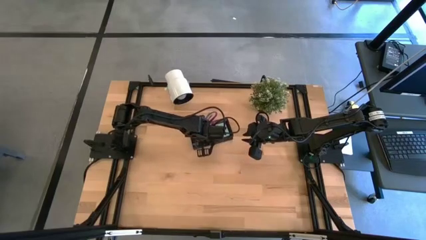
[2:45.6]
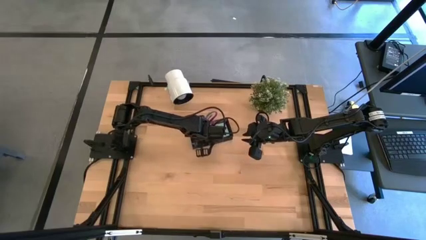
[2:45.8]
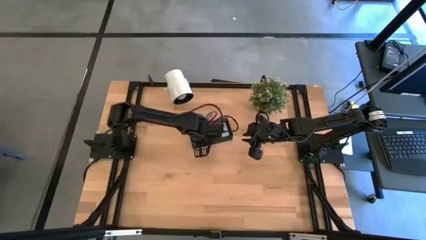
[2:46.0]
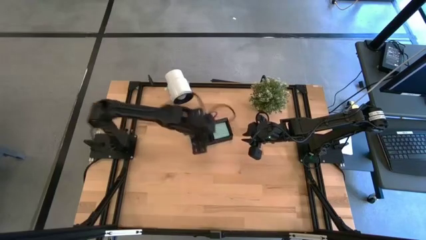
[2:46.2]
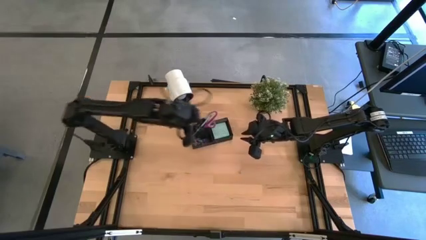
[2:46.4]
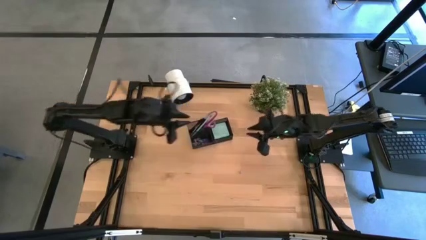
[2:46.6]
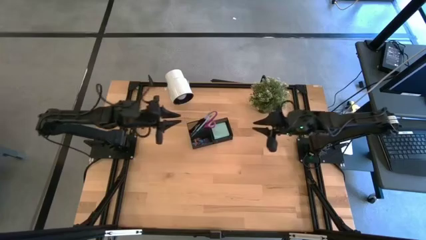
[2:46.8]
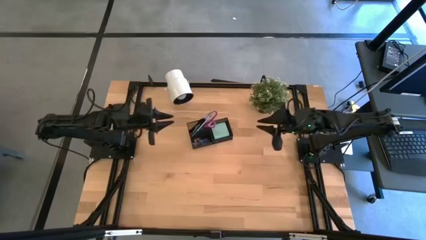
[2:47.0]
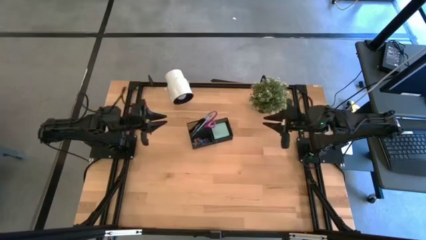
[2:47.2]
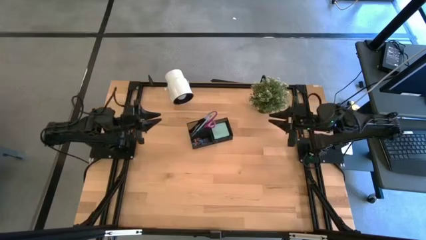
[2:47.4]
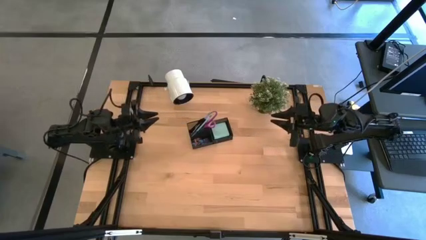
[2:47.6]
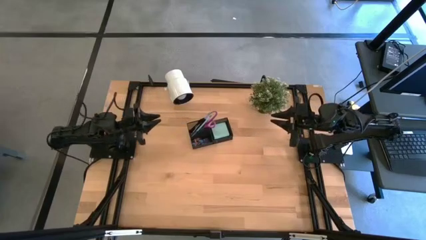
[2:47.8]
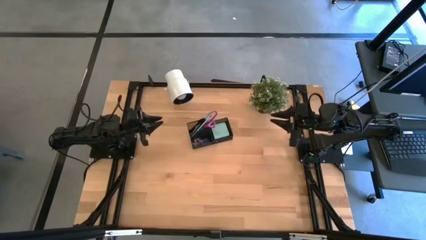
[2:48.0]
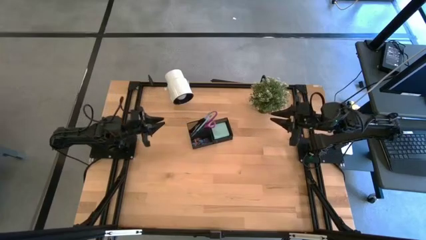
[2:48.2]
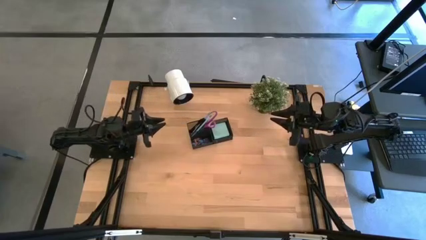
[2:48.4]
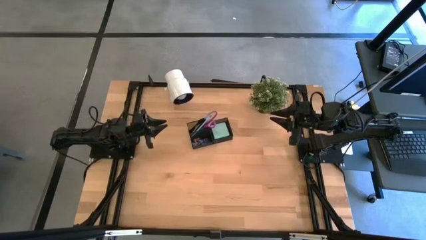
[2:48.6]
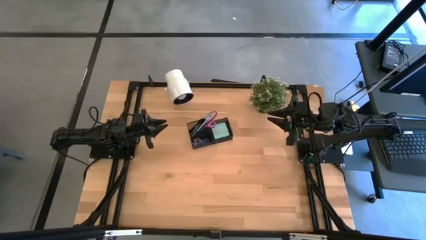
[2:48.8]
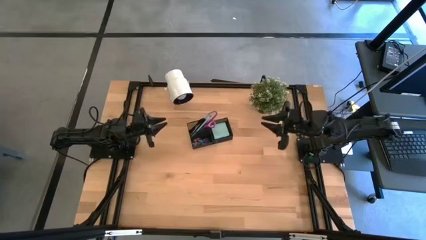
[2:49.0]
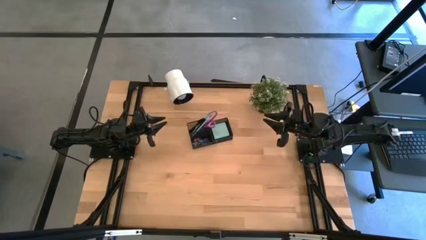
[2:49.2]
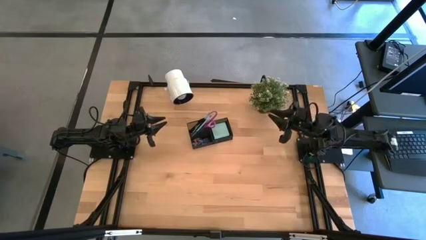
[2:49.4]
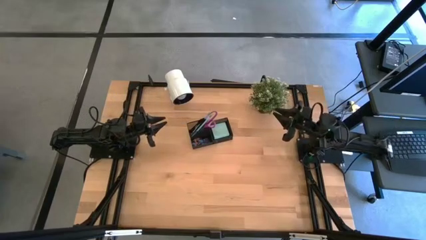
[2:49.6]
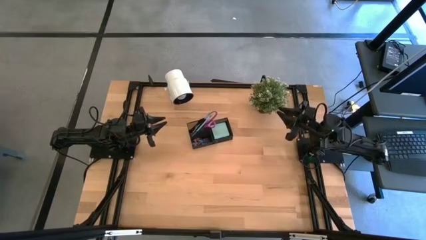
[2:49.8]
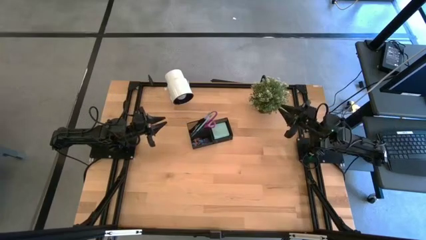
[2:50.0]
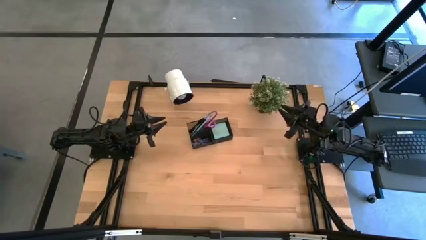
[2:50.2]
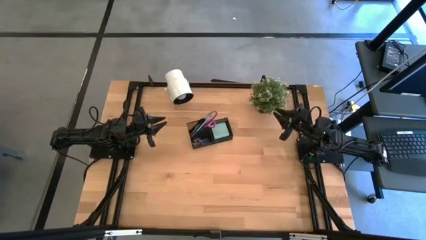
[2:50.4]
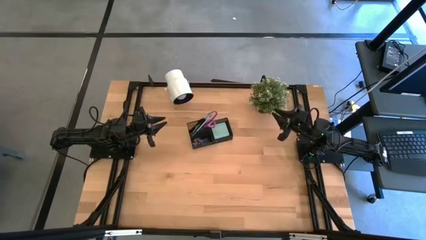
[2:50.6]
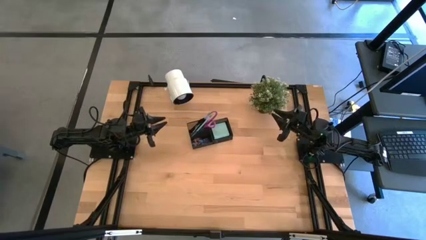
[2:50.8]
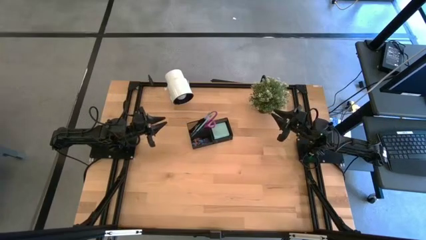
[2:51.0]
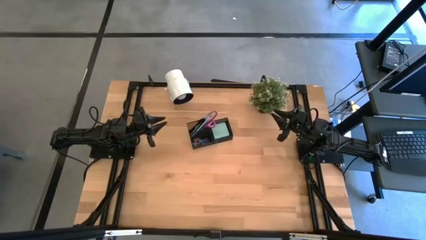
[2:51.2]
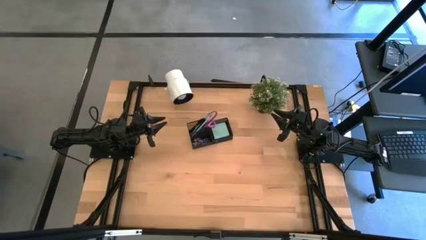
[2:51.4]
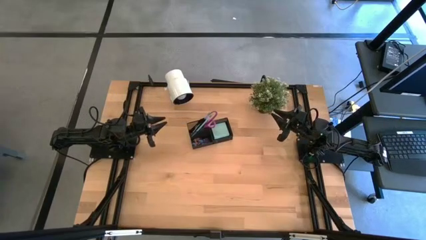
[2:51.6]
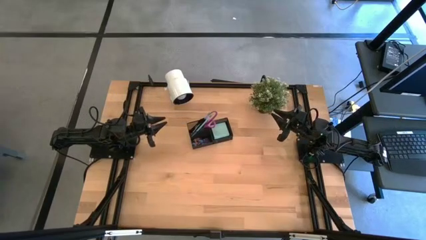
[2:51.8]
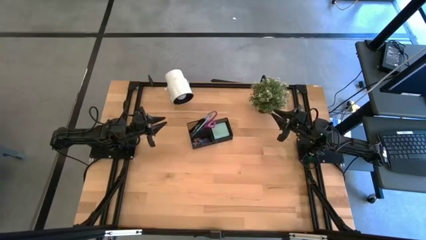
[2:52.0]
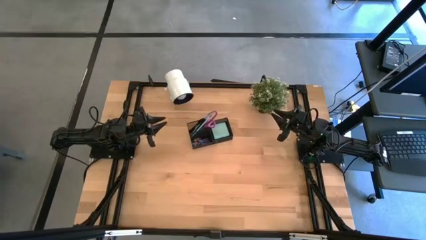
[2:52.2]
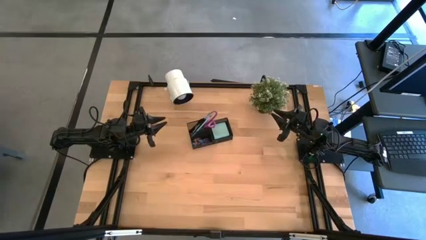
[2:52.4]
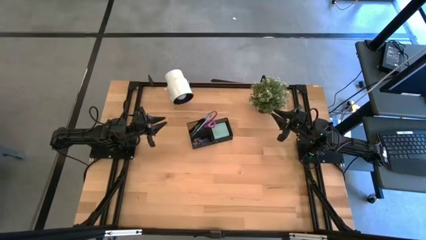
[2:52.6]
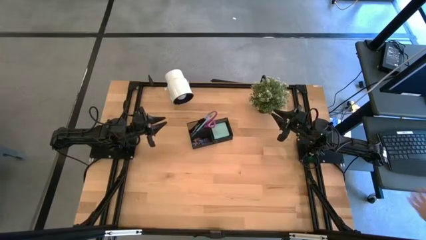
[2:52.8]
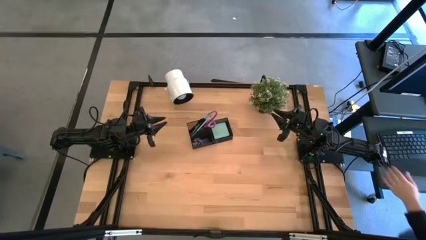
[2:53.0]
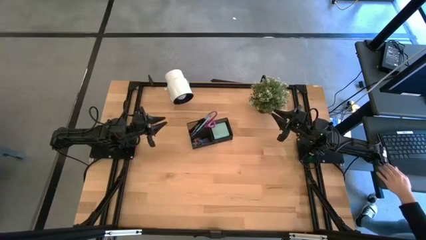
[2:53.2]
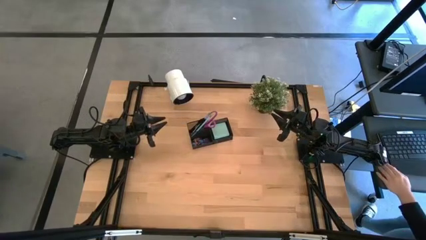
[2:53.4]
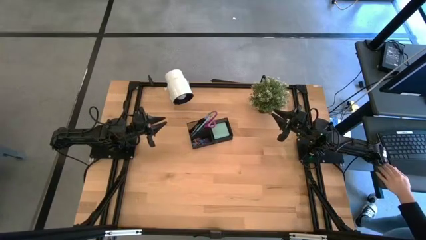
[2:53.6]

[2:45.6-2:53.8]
Task: Pick and place office supplies into organizer
Return to Home Position

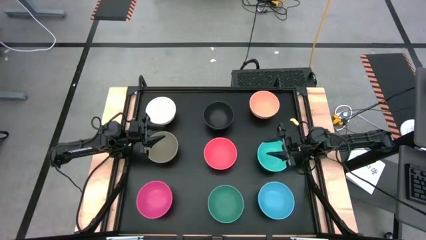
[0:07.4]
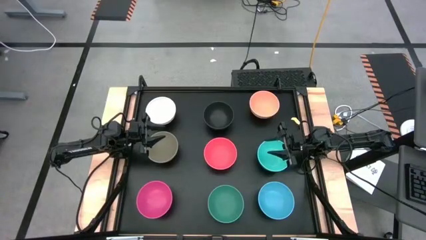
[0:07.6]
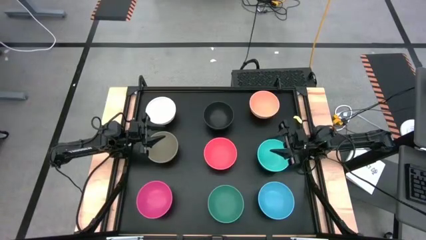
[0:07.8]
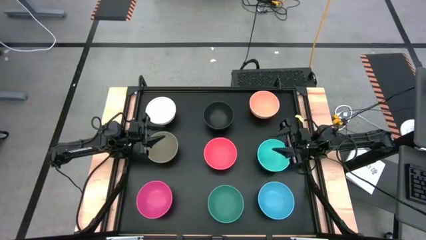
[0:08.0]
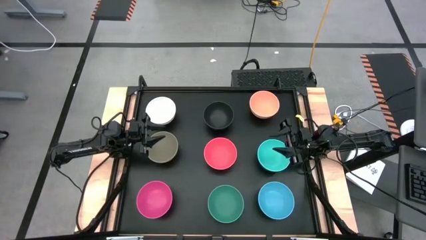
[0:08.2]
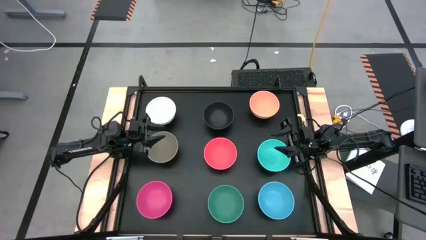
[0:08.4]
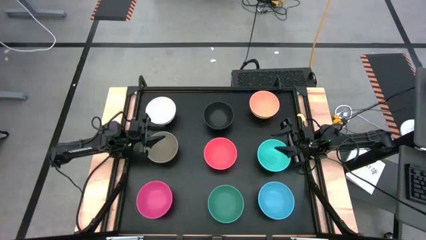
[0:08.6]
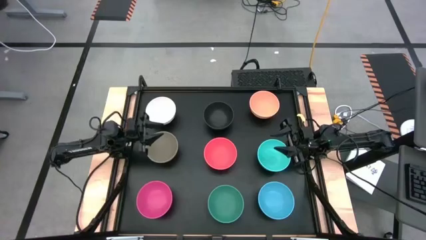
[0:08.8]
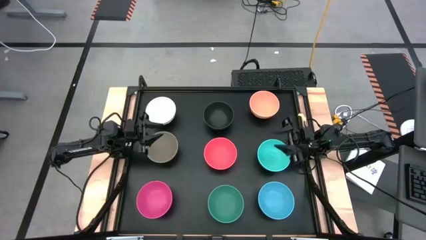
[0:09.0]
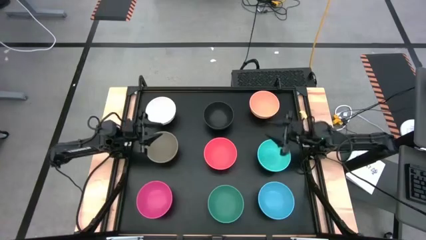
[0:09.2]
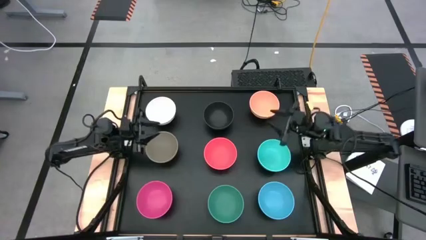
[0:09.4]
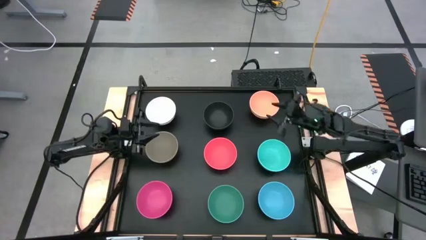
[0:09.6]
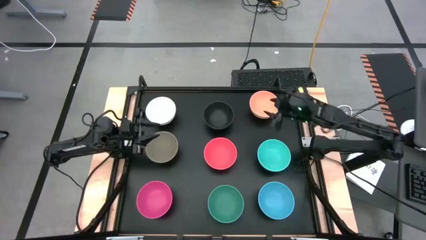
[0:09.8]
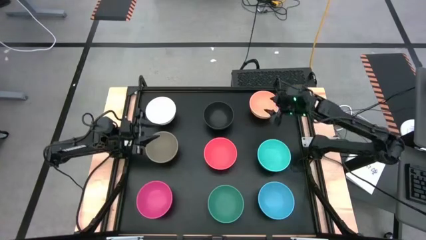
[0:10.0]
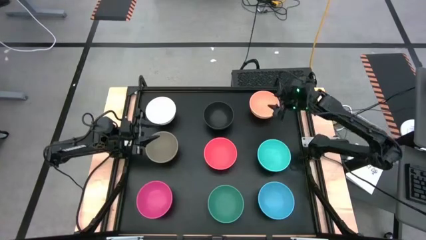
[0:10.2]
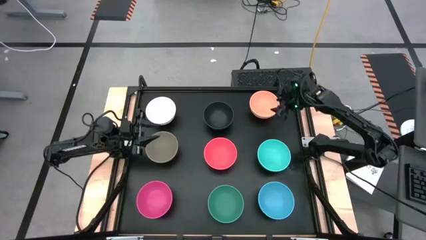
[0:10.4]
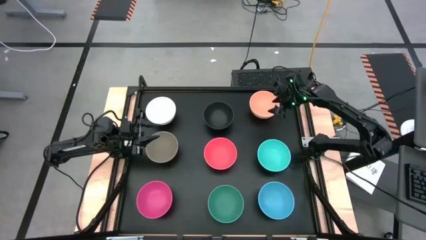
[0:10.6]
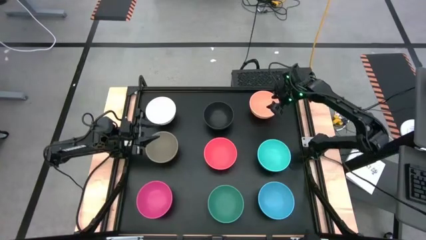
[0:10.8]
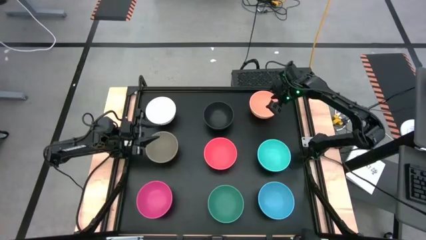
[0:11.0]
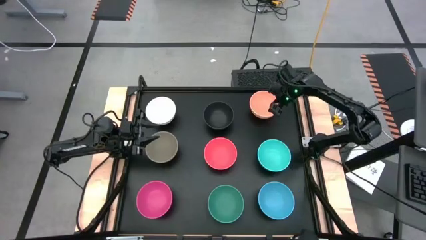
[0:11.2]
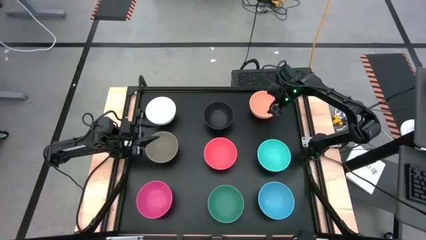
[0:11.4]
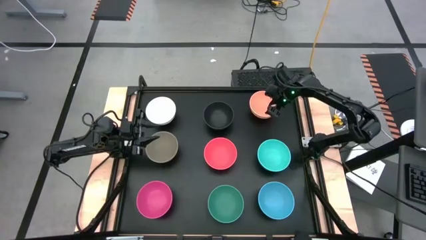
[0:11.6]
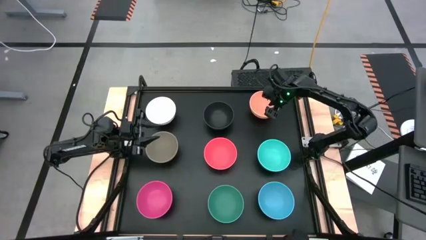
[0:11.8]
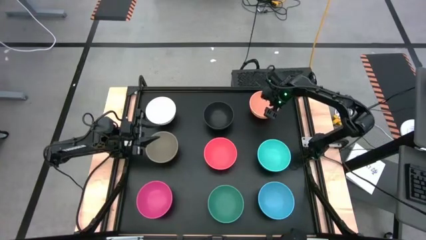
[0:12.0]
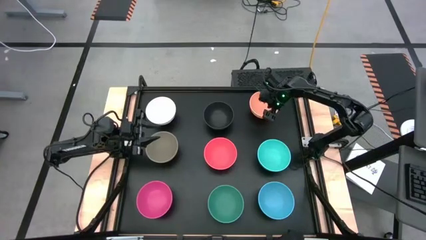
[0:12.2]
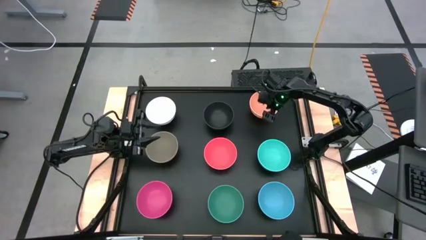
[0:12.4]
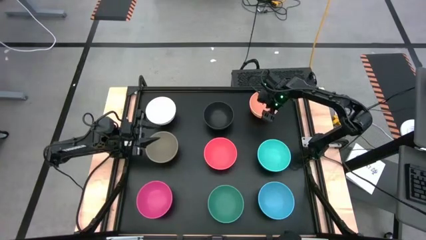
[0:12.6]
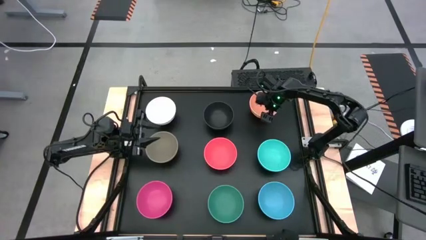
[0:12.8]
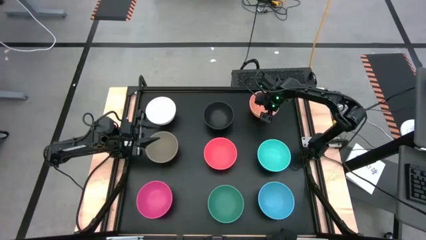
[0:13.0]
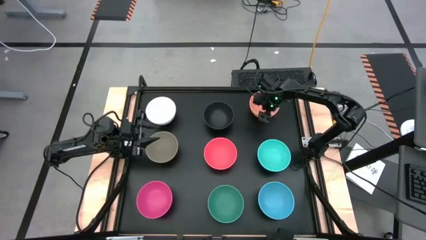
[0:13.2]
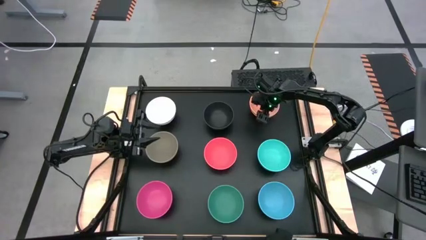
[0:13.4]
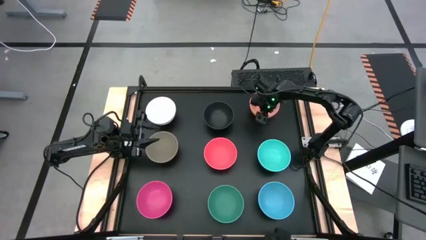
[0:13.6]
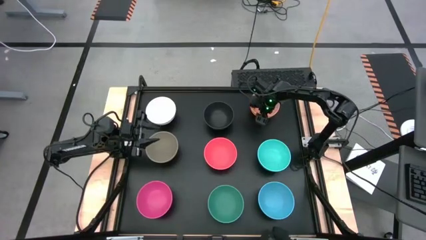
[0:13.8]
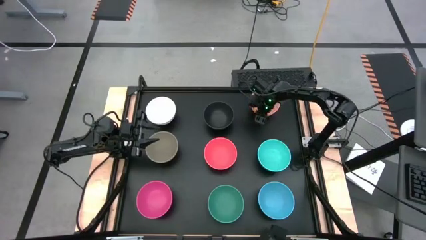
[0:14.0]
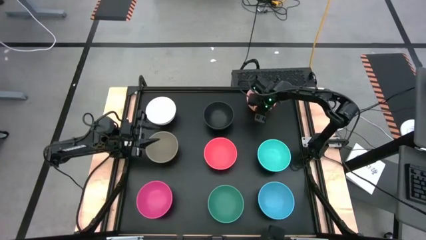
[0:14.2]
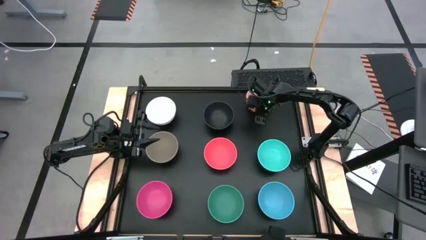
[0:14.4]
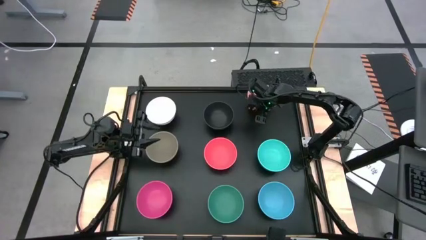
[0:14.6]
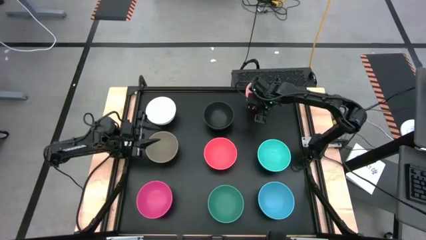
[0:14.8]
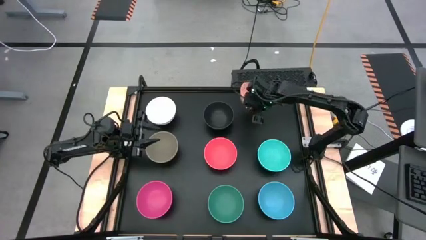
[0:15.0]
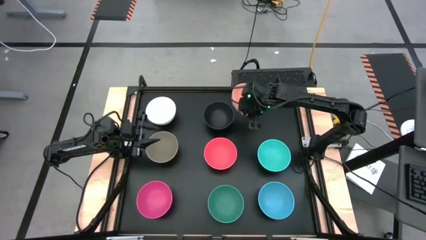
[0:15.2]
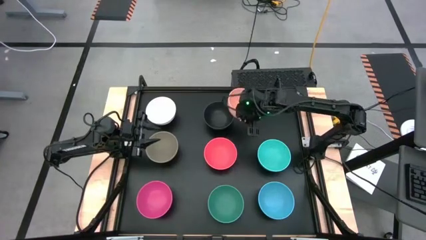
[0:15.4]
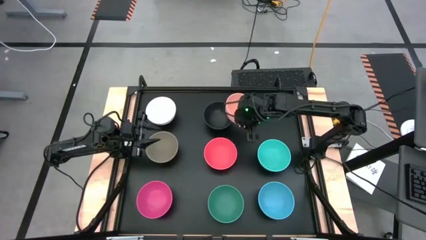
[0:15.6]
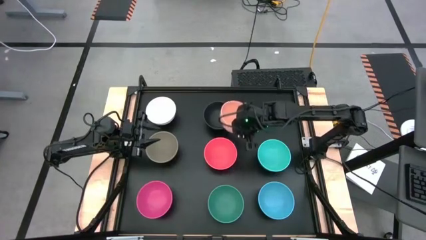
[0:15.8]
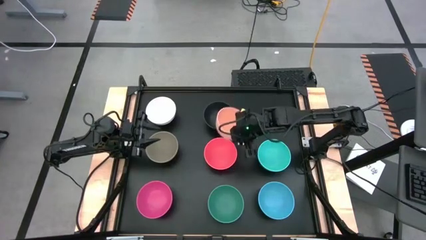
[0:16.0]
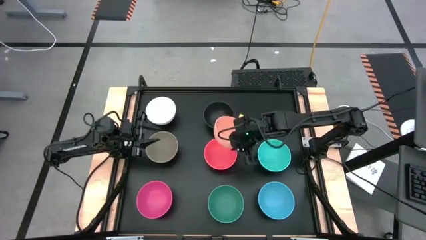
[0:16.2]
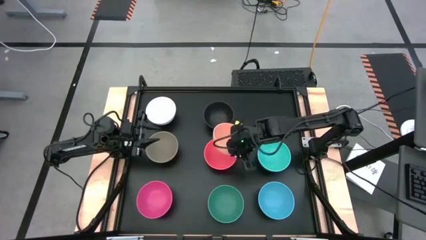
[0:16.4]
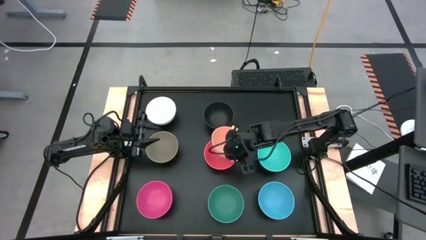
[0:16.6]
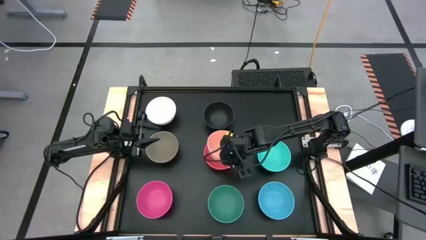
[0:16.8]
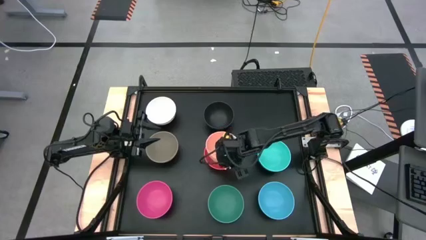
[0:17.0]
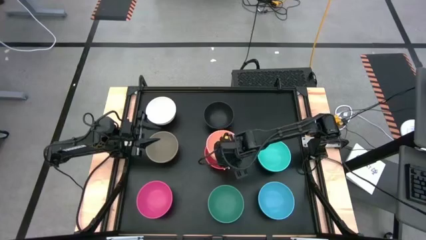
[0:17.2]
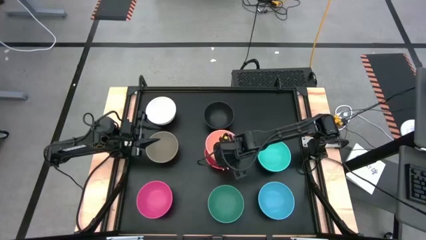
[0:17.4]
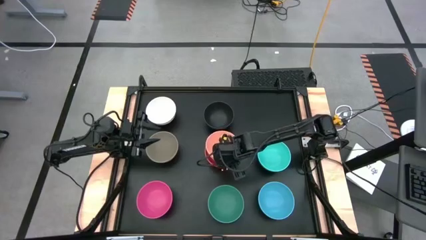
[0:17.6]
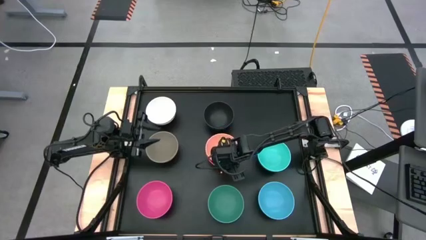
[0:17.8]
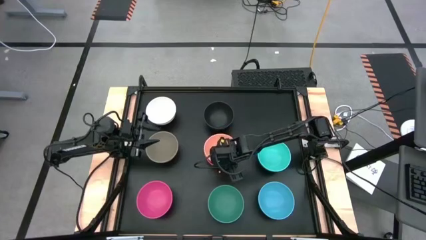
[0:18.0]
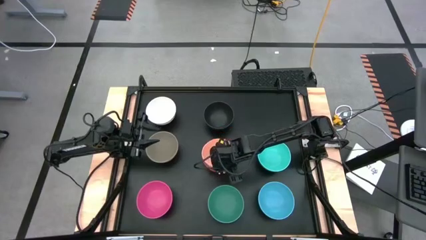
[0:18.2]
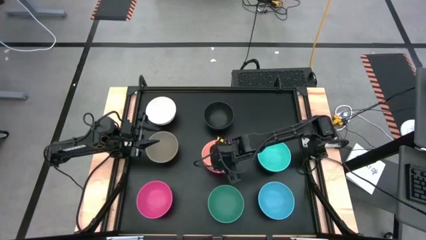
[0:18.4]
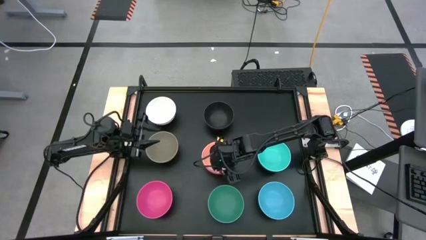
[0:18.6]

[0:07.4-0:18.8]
Task: Nest bowls inside each other
Stack the light orange bowl on the orange bowl
